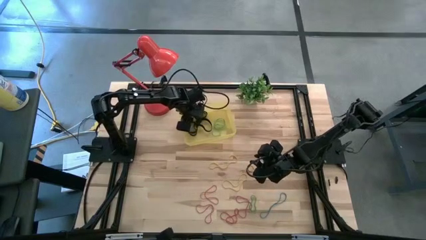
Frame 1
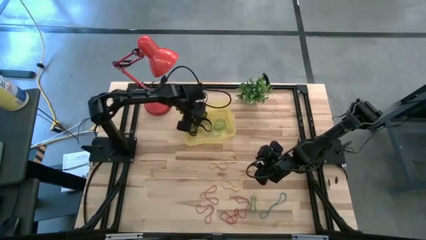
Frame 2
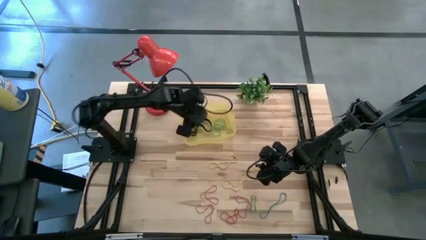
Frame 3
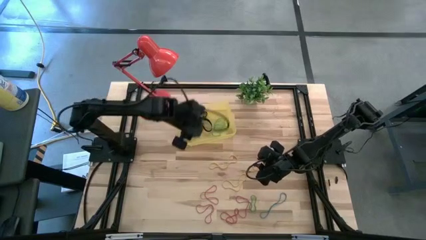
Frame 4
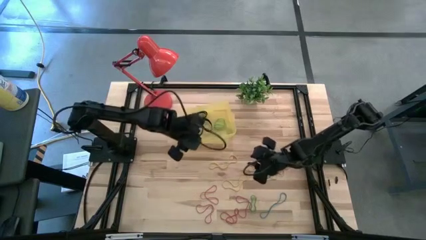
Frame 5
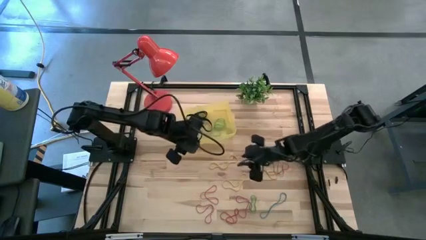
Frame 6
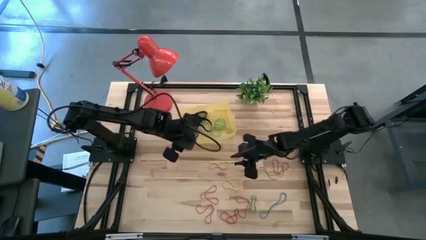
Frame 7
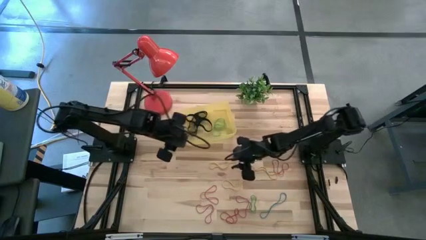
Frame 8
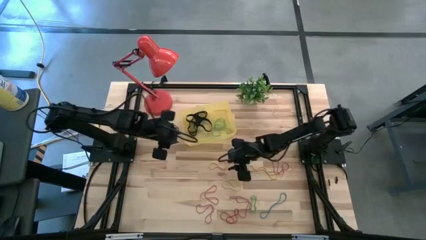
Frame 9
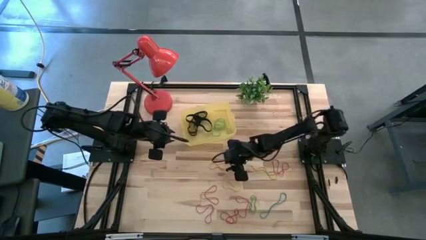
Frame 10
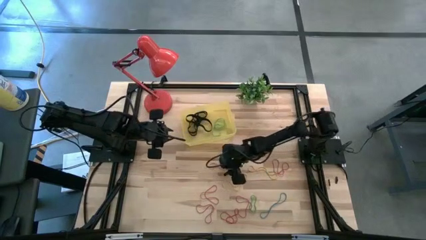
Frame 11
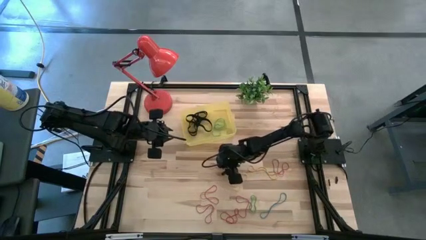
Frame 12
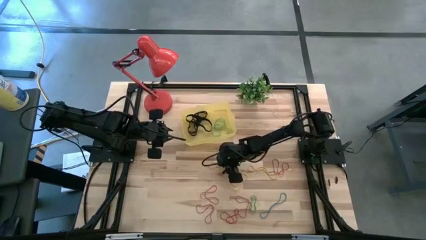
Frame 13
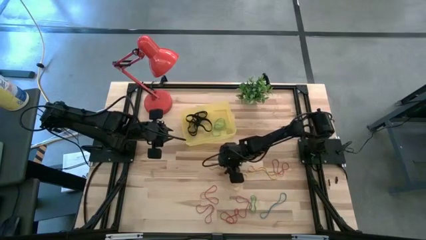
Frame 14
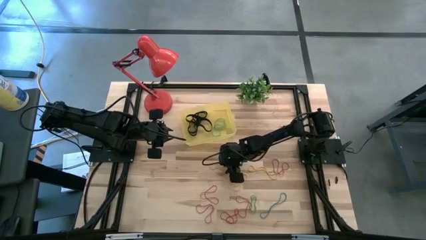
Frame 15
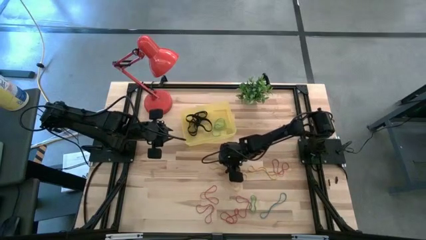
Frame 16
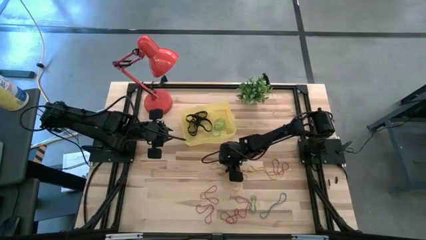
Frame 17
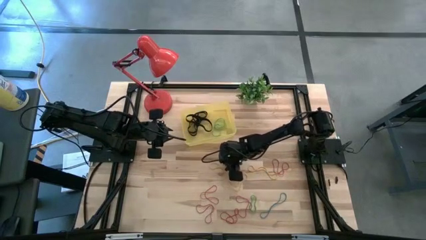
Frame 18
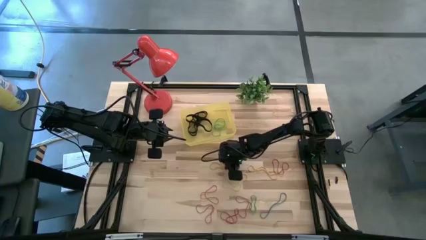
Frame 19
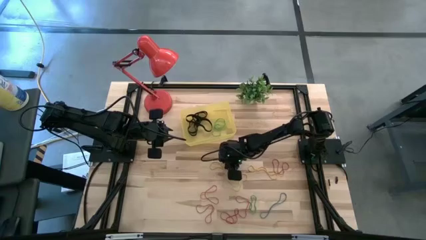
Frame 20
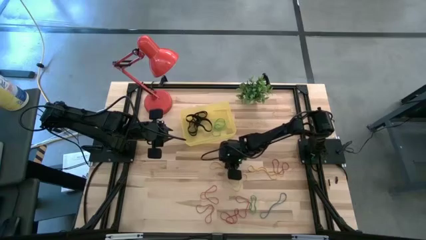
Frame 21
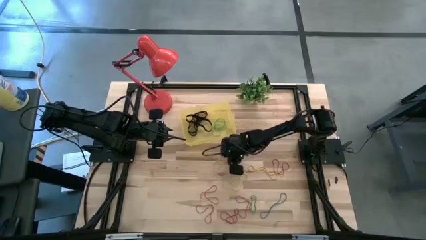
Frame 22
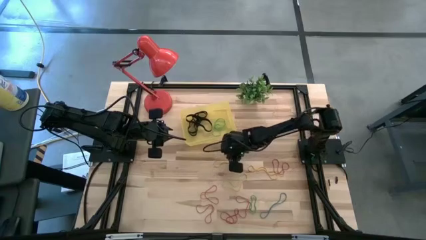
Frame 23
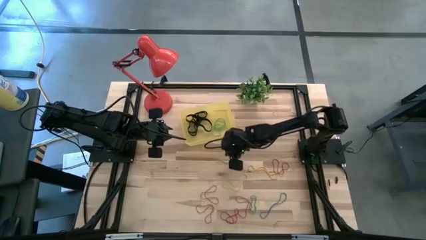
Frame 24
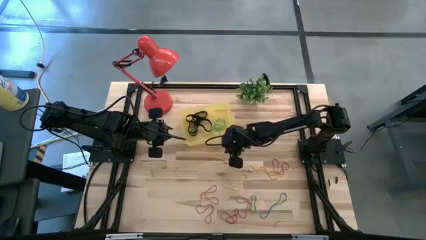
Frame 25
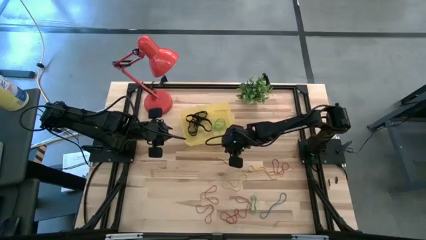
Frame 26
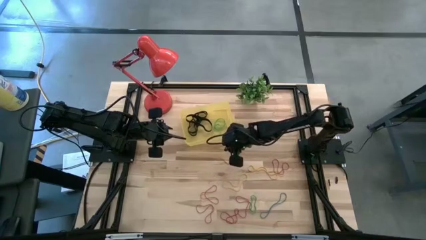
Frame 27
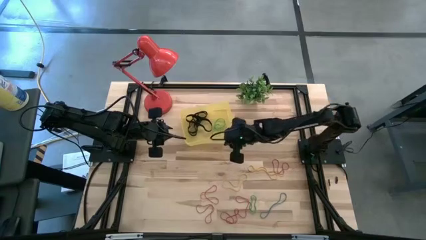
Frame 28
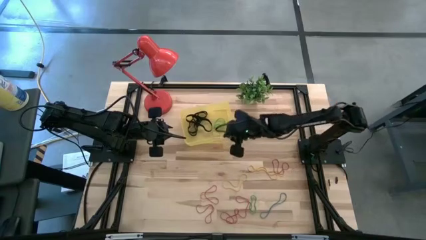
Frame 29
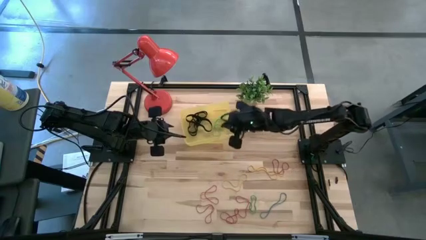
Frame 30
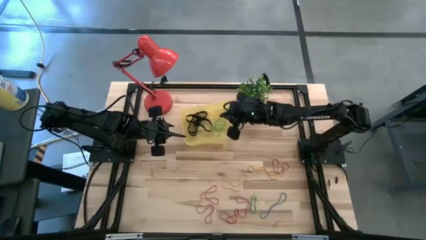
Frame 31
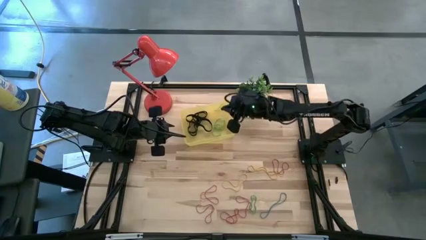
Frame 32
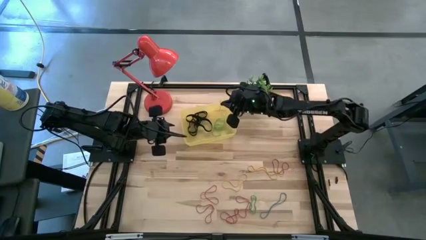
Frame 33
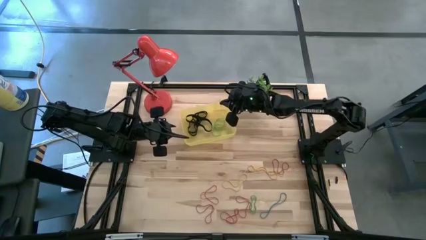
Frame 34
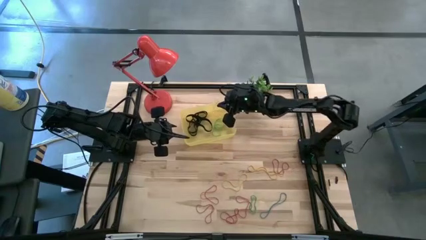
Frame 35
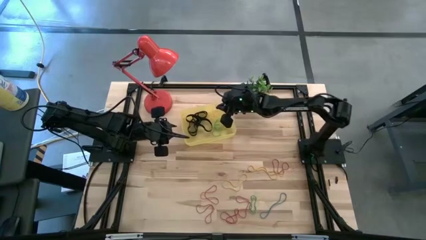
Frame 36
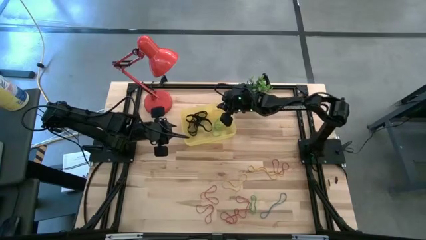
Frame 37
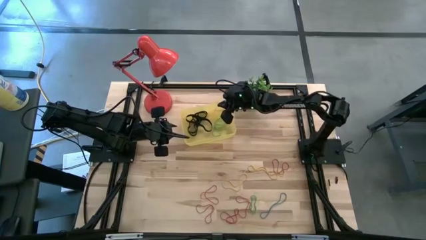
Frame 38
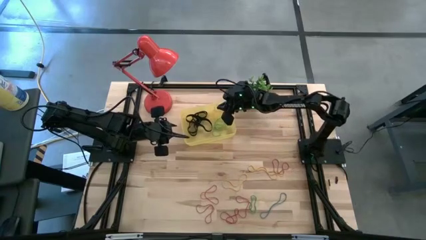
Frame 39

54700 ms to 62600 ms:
Task: Pick and place rubber bands into bin
Put the yellow rubber band into the yellow bin

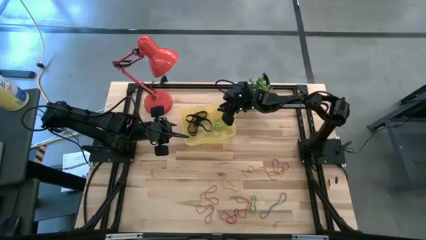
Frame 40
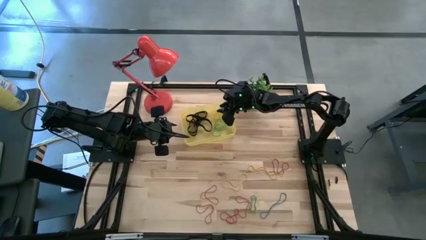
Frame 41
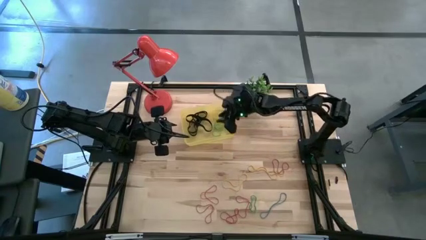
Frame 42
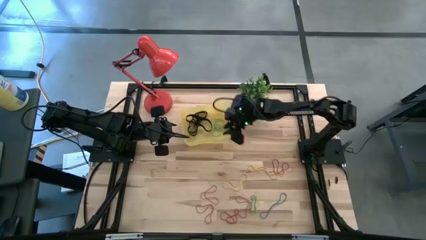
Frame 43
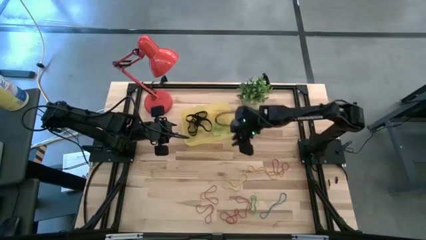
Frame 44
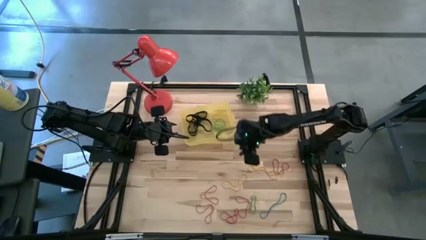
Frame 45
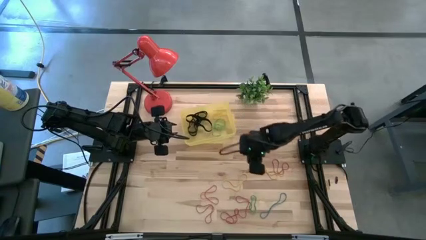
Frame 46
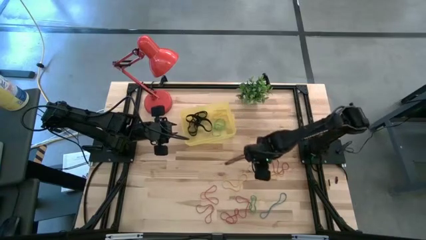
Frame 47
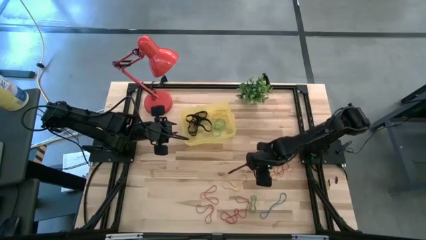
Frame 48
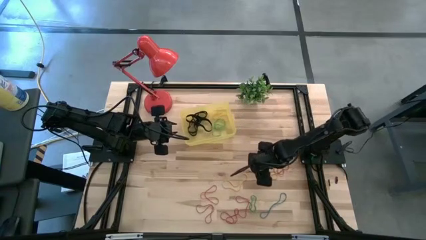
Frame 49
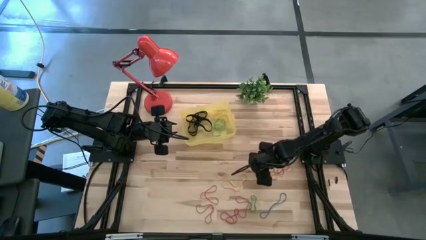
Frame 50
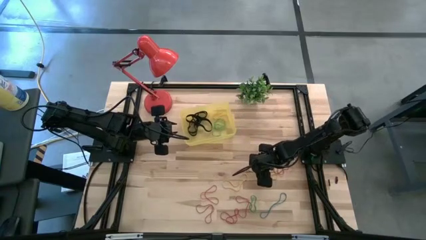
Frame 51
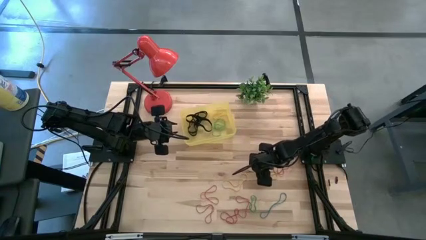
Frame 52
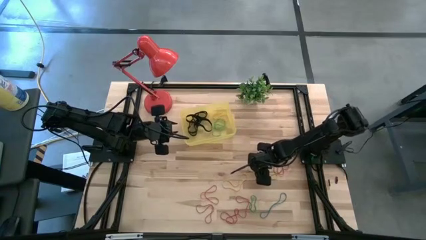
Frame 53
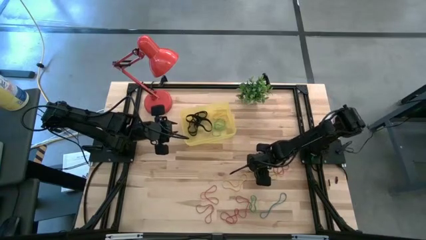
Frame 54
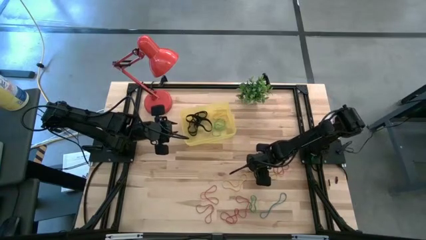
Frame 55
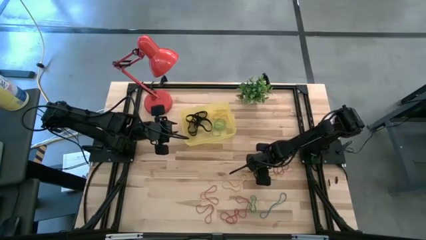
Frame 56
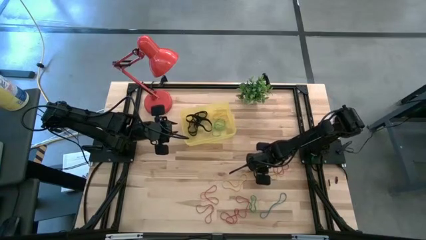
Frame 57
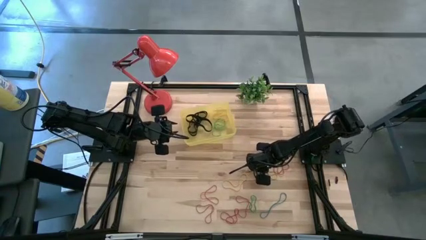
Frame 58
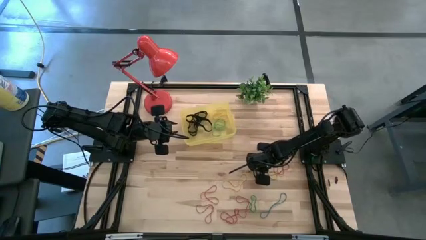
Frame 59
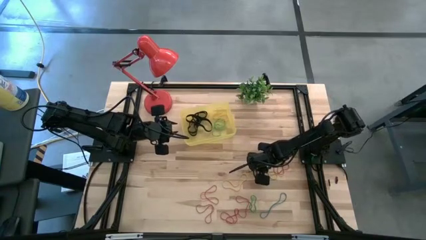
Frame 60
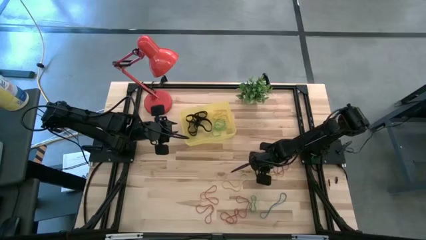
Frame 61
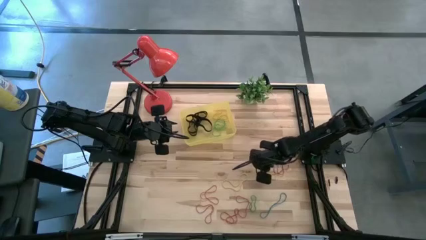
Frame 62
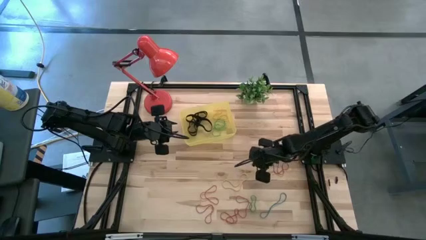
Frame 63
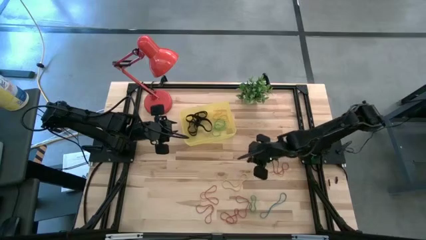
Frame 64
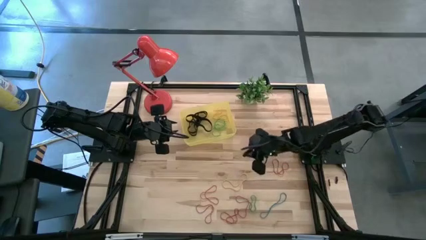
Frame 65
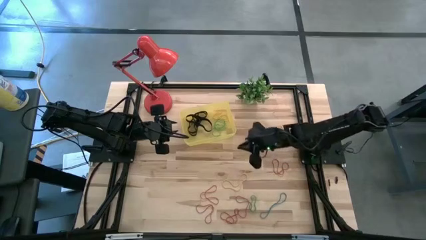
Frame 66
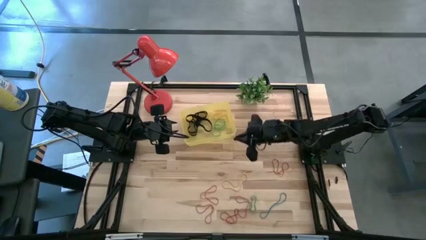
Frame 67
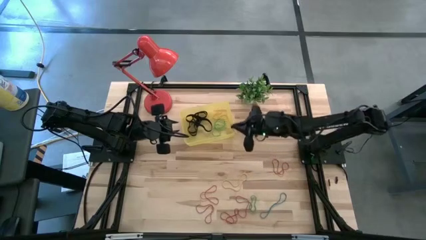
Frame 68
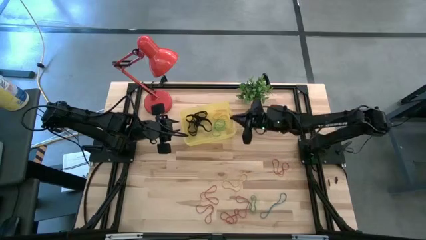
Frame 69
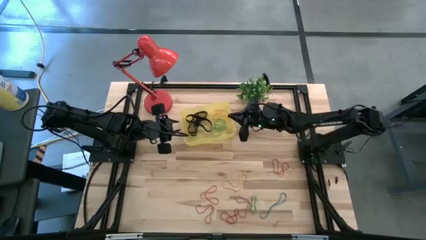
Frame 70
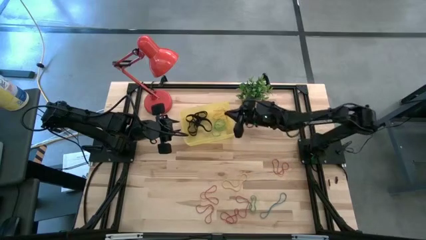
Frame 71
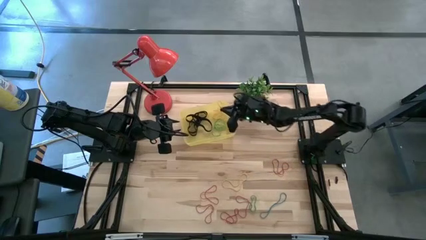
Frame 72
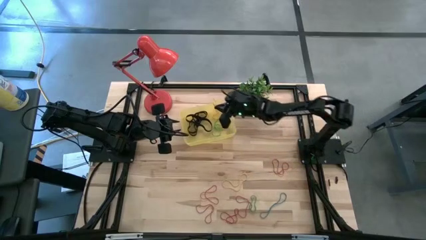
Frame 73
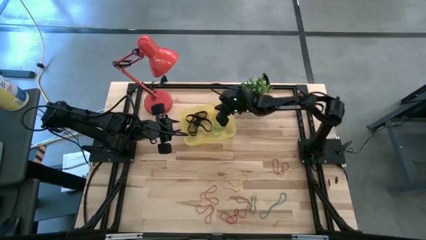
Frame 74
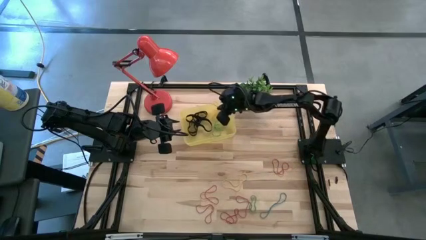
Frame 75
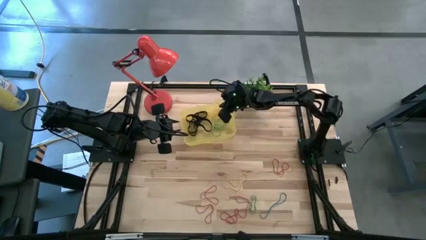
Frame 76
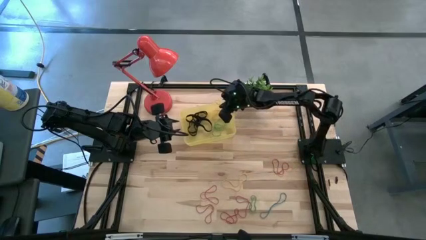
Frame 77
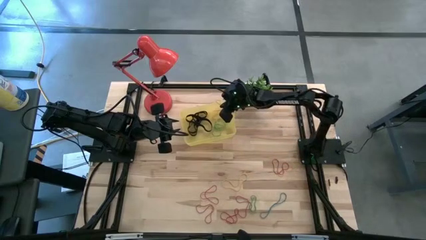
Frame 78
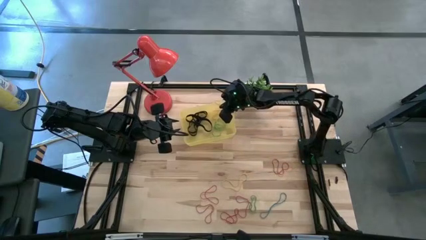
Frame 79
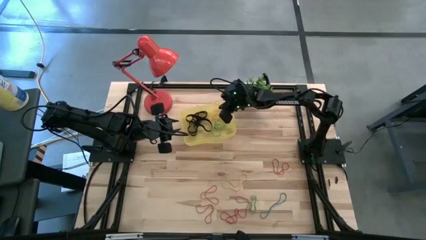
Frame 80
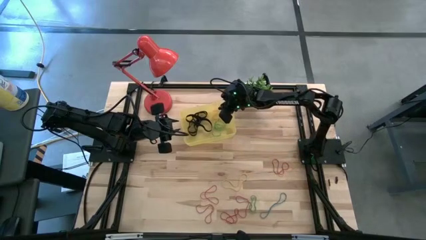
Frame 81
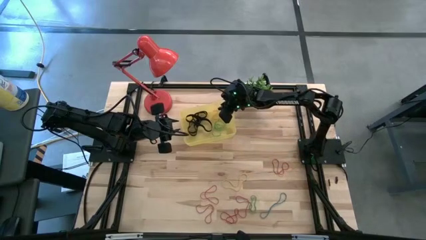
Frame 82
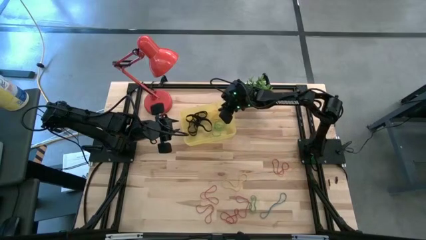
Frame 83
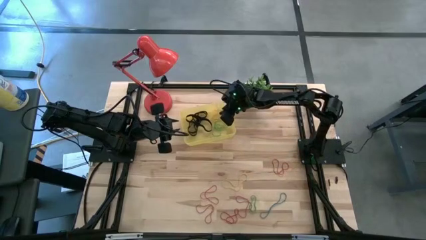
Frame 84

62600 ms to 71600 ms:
Put the yellow rubber band into the yellow bin

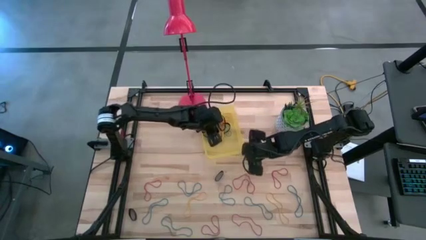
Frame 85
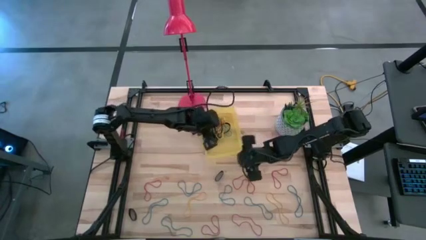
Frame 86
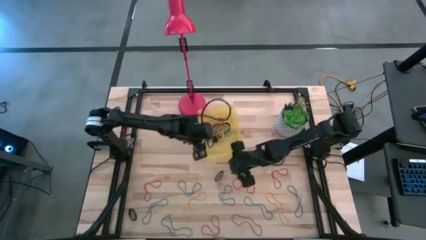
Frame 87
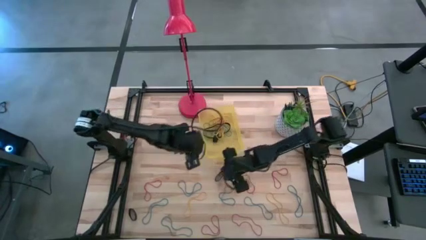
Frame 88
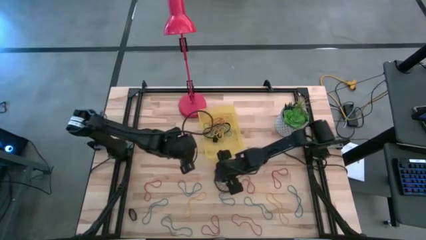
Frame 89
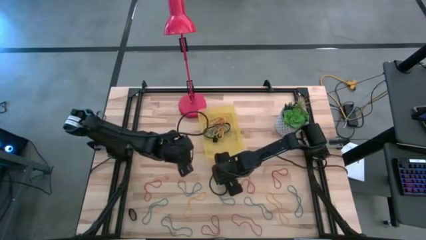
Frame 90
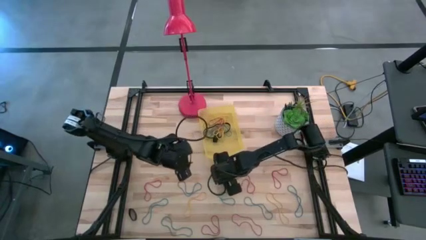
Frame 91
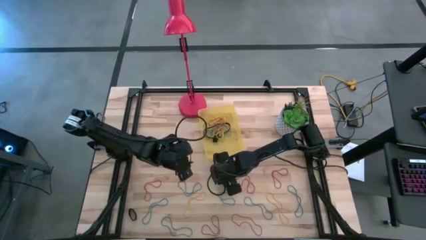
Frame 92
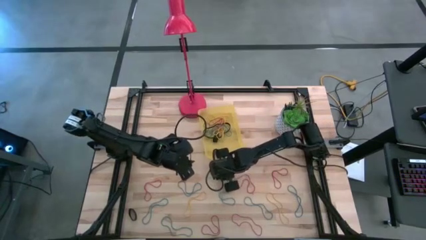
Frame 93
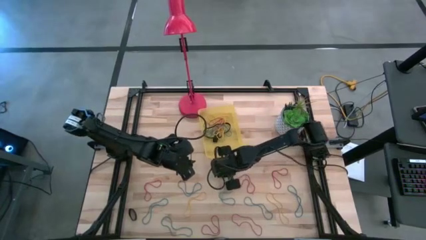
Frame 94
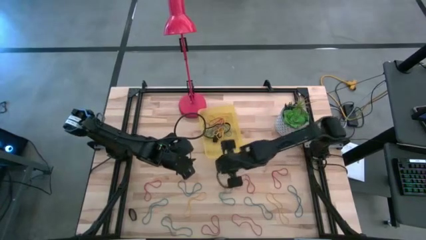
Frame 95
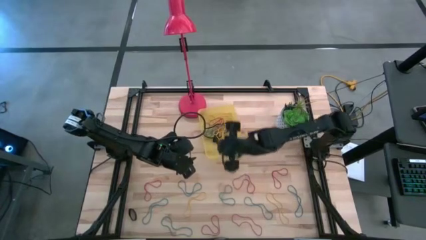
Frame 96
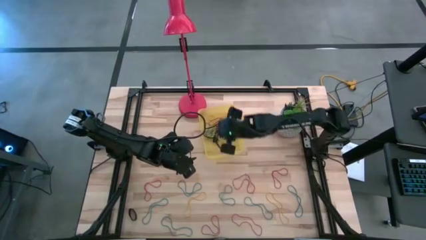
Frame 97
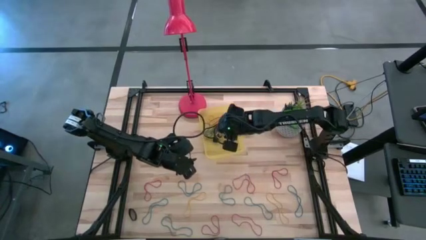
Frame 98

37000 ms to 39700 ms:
Task: Pick and place rubber bands into bin
Put the black rubber band into the yellow bin
